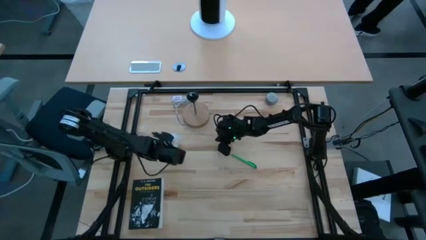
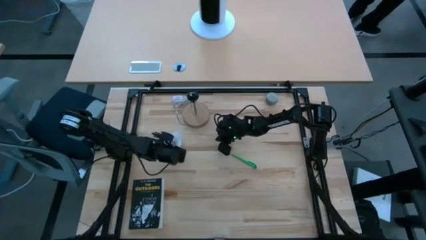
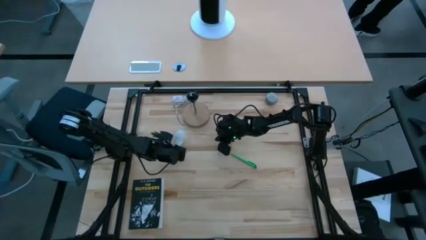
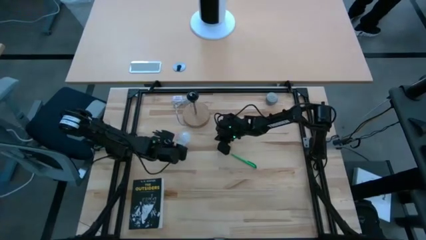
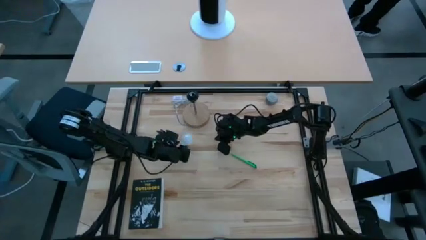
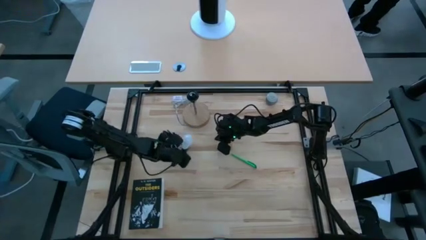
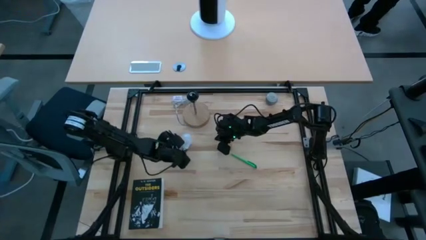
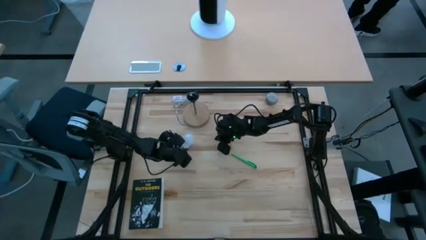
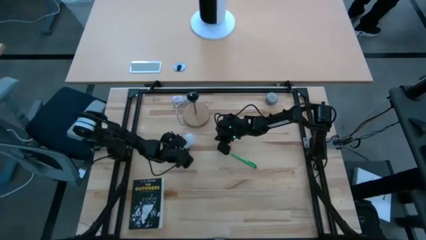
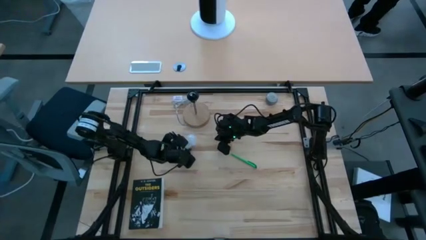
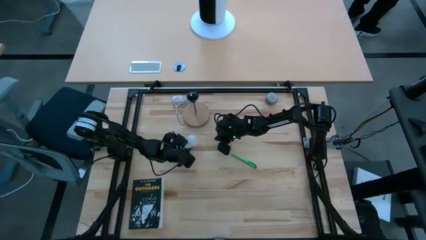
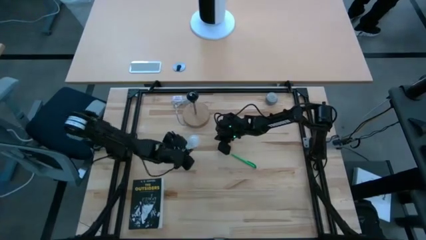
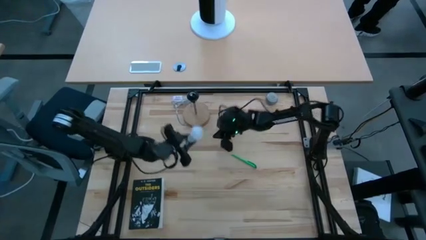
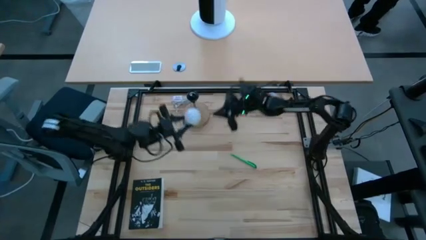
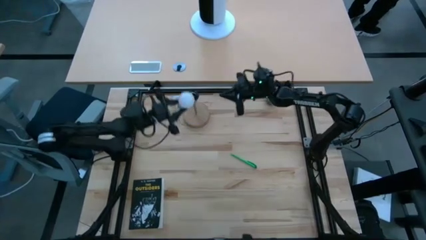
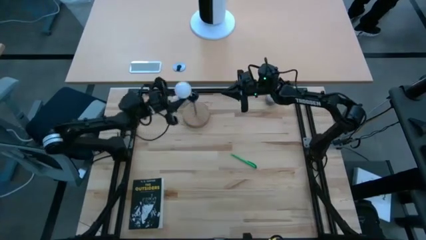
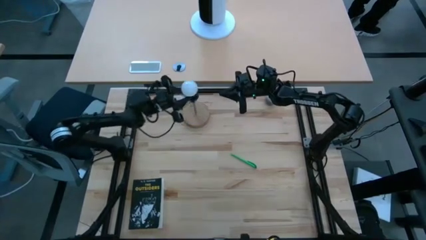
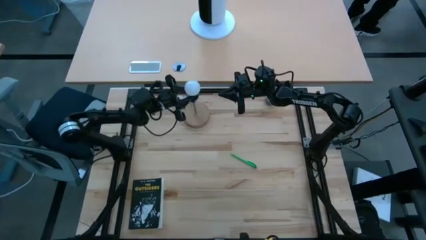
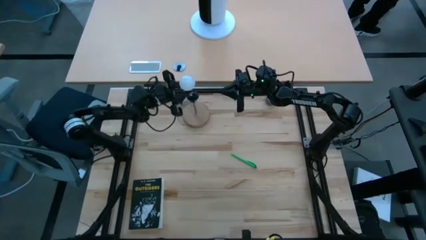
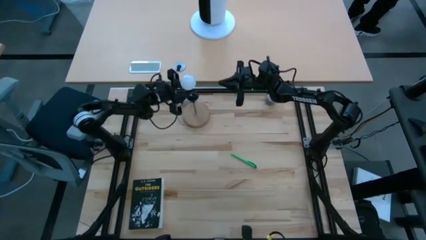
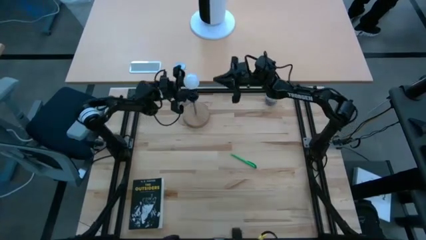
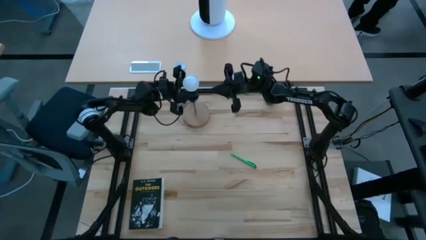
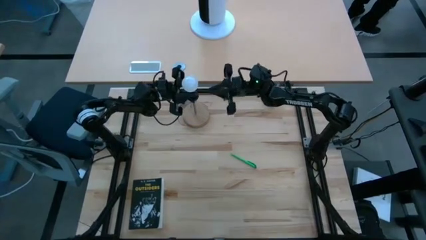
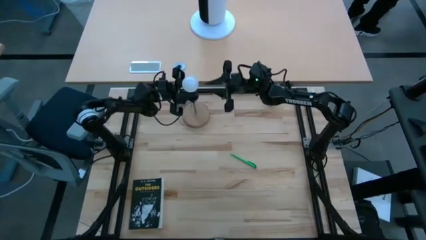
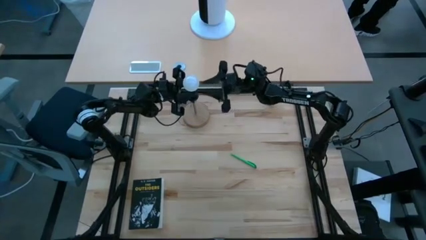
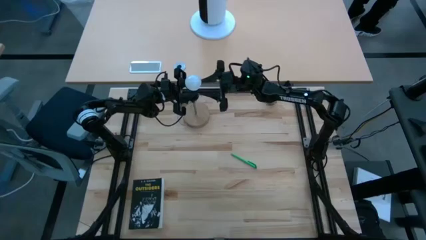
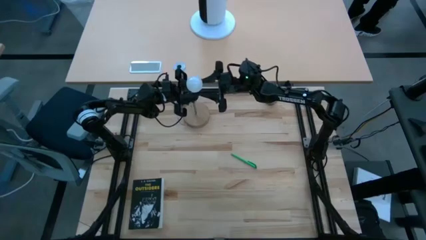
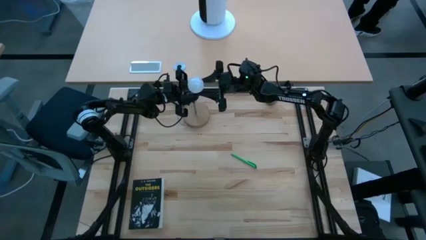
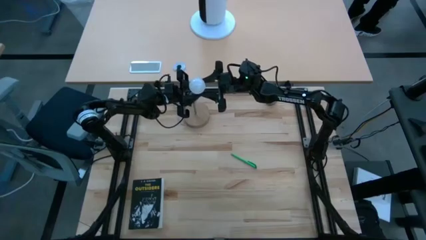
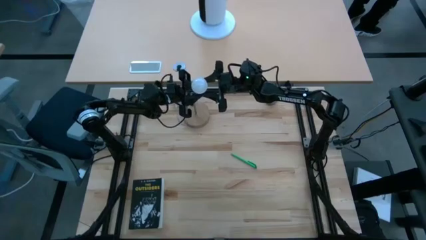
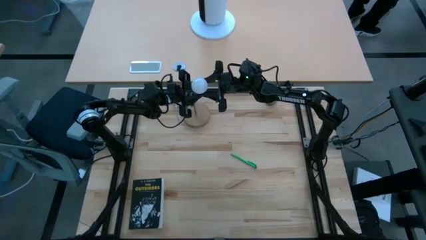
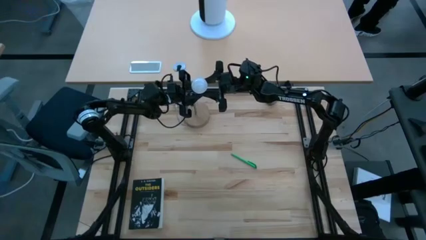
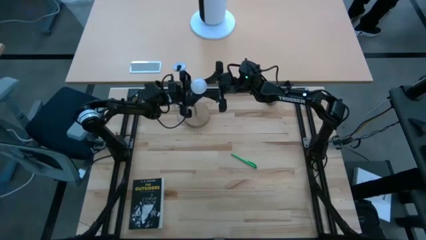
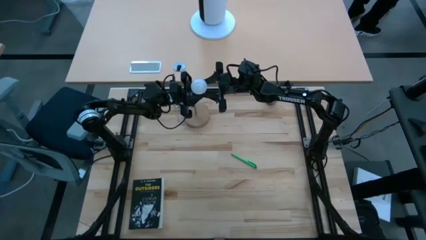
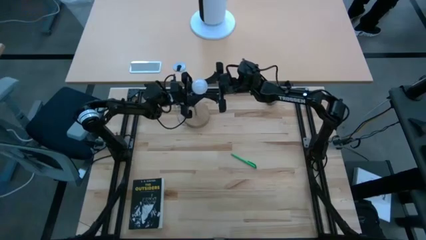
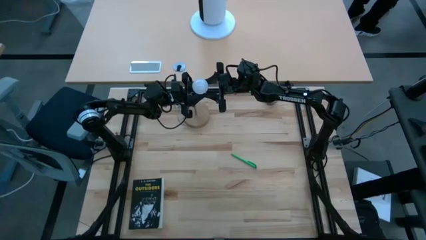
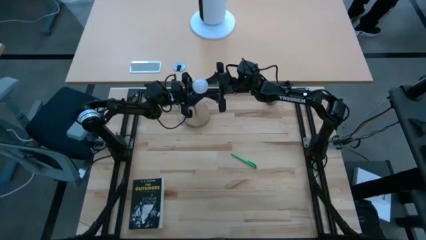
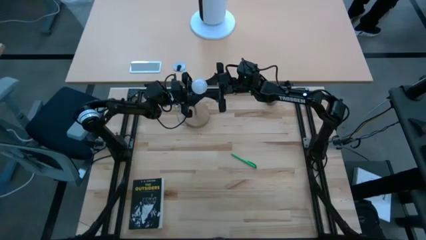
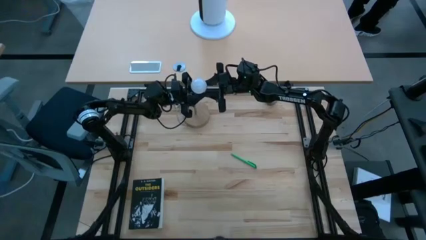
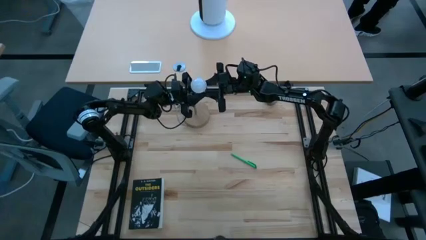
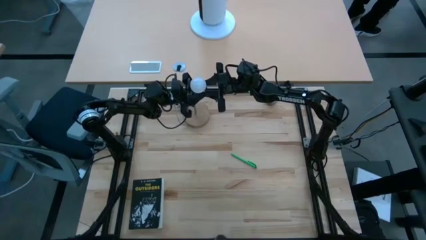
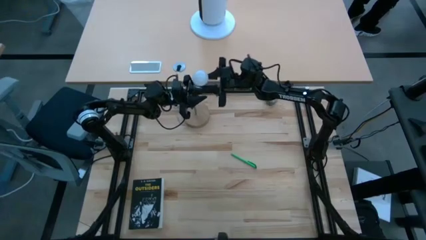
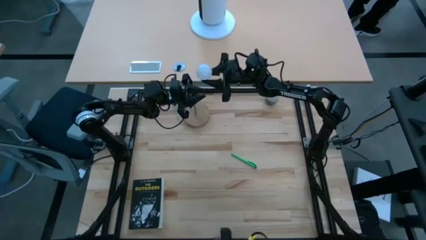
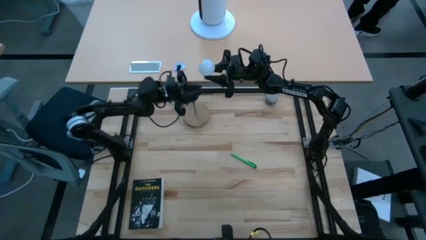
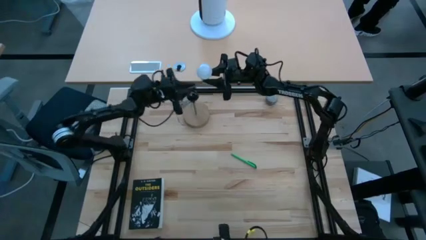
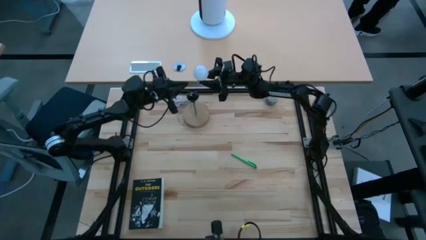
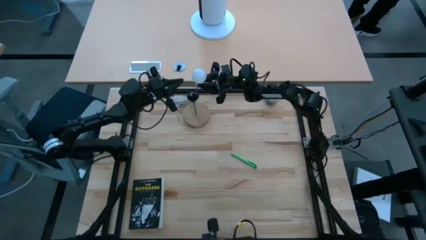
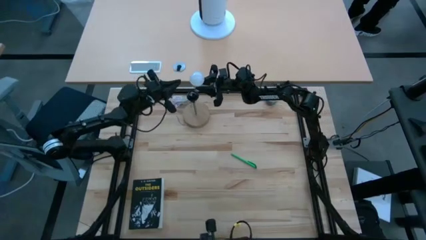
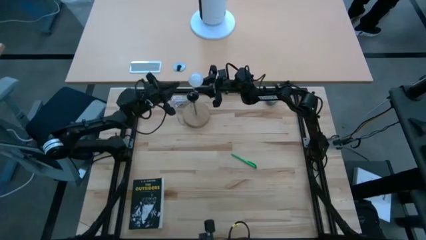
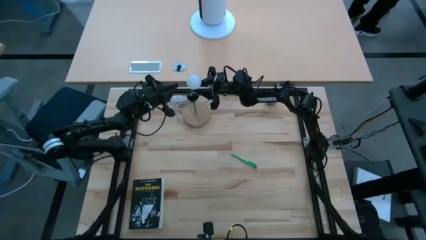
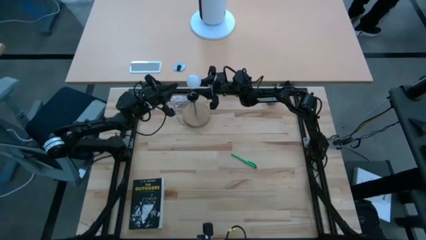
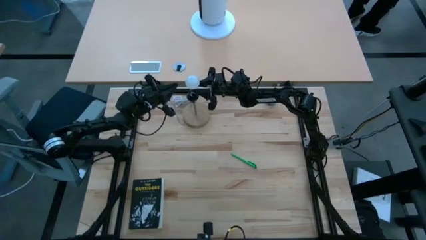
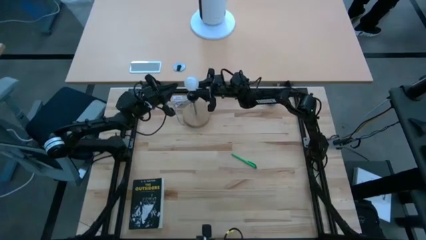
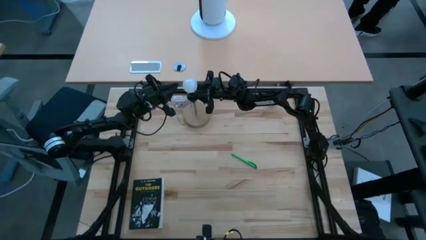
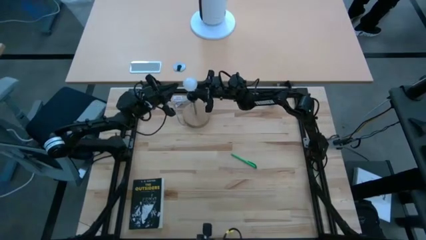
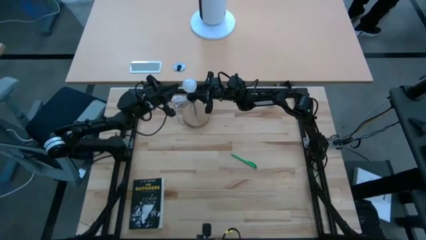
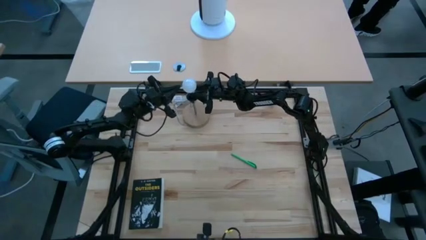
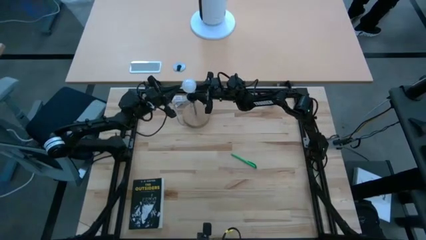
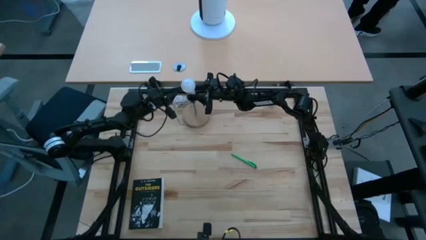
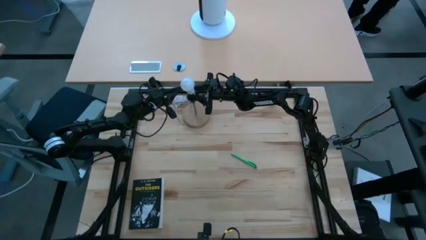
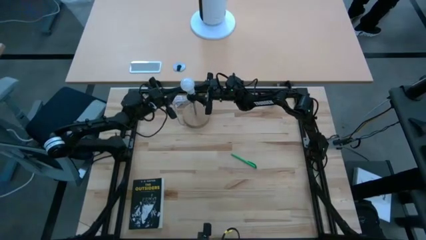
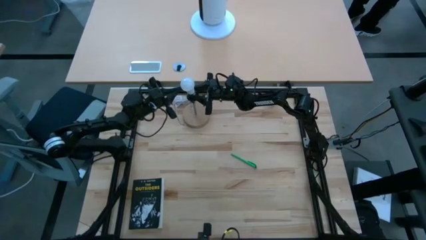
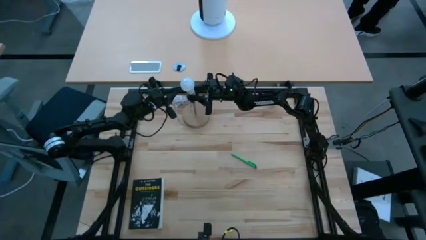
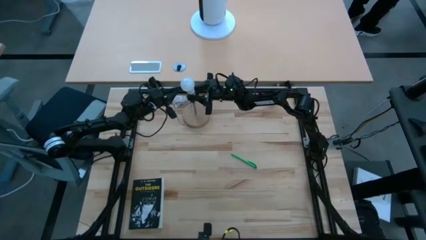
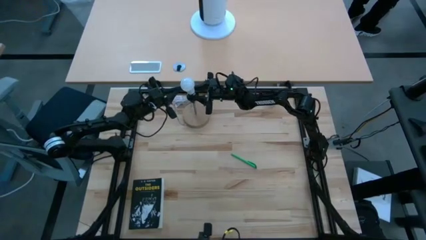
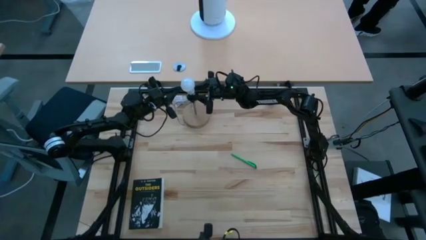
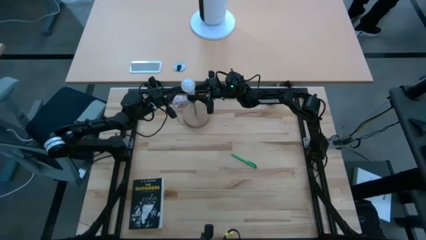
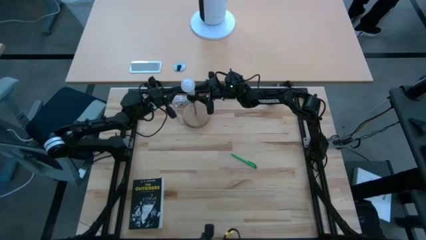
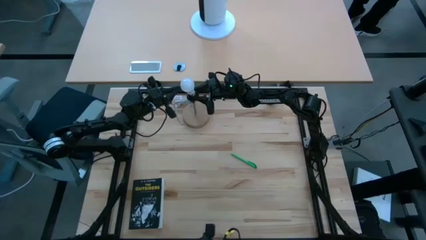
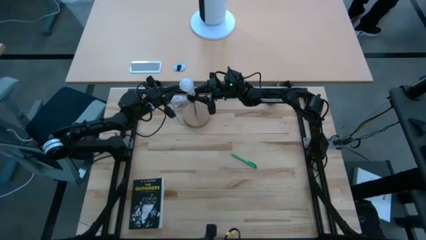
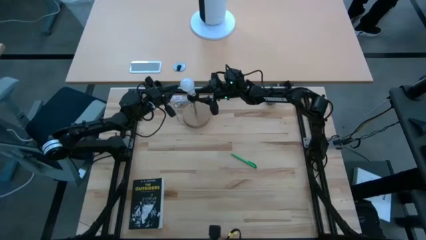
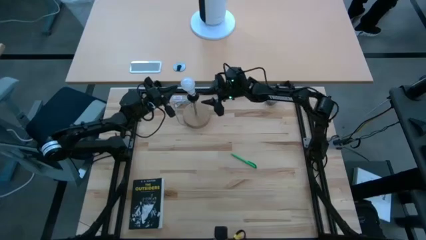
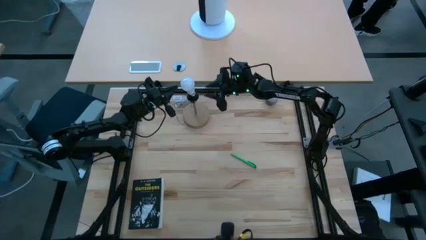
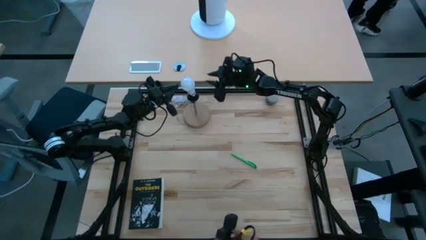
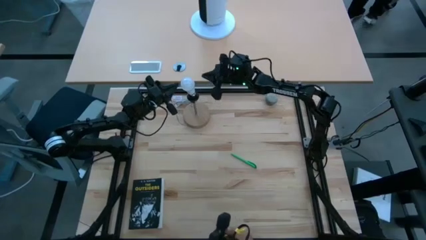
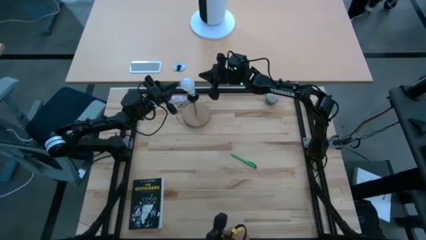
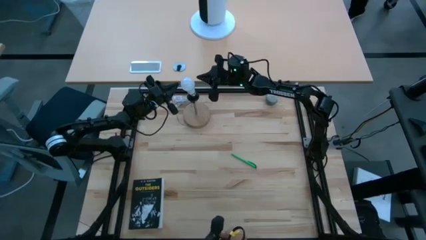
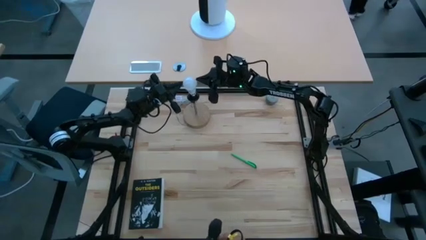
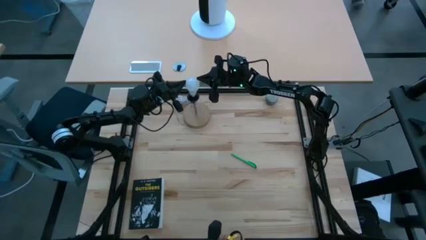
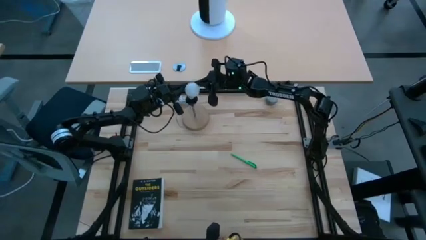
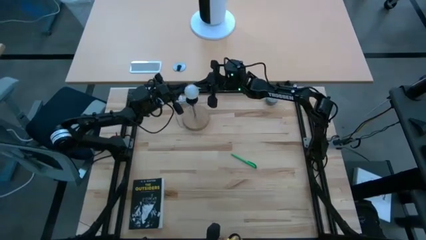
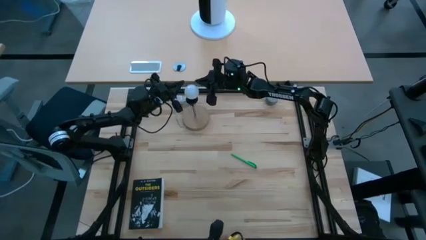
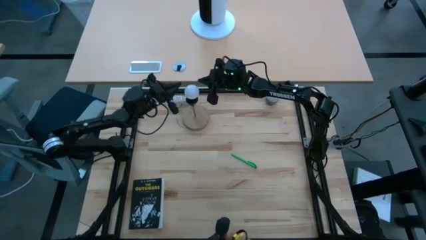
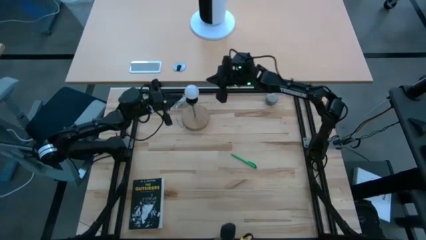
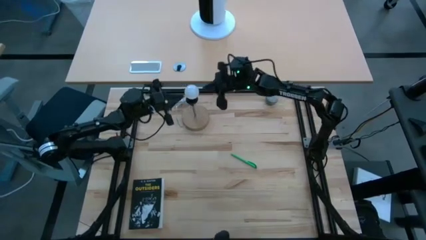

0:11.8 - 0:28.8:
Task: Screw lightbulb
Insert the lightbulb into the lamp
